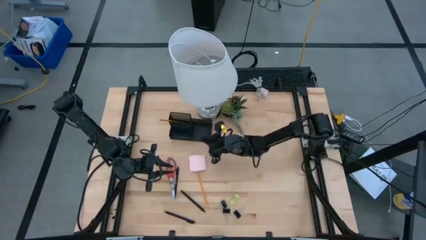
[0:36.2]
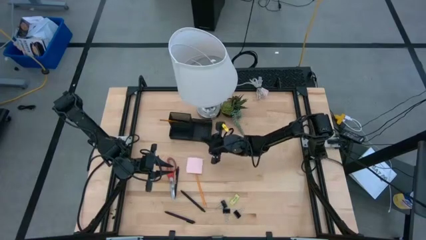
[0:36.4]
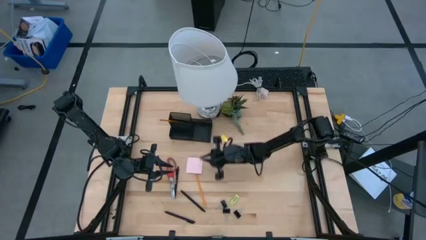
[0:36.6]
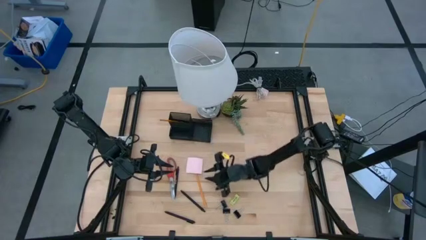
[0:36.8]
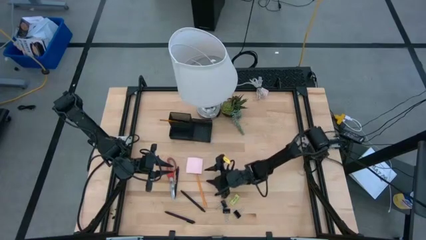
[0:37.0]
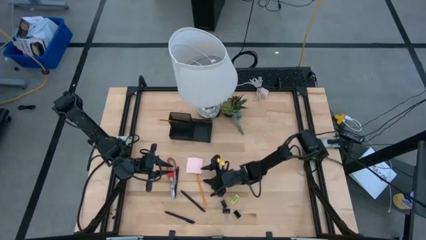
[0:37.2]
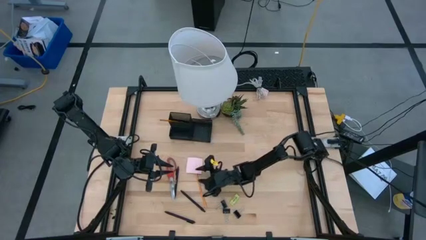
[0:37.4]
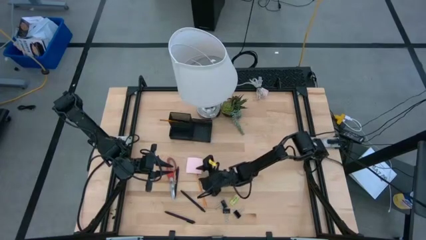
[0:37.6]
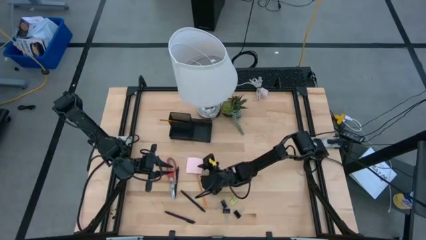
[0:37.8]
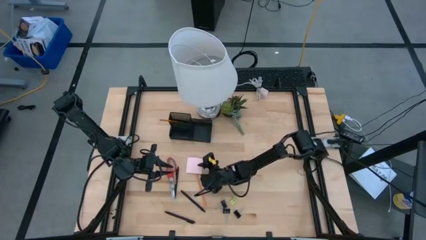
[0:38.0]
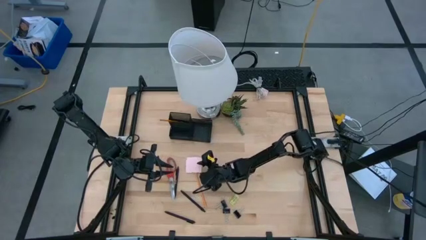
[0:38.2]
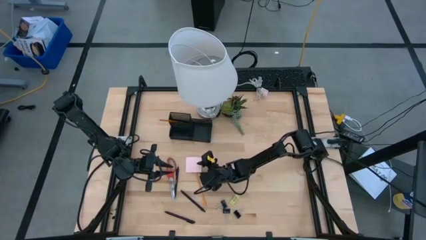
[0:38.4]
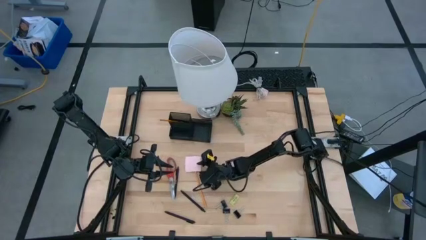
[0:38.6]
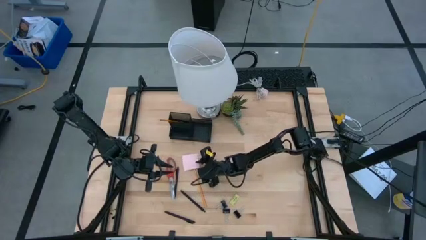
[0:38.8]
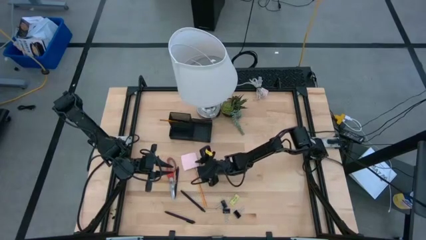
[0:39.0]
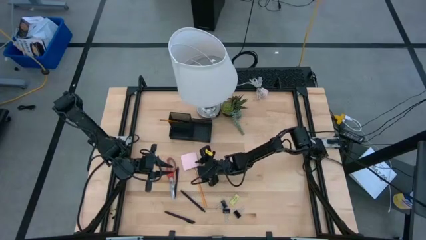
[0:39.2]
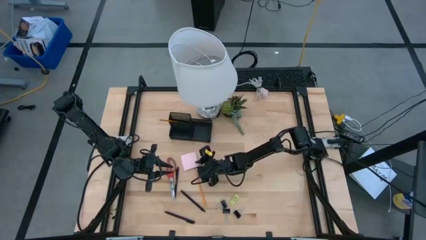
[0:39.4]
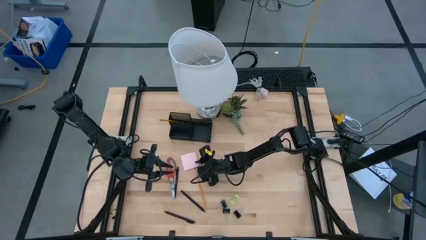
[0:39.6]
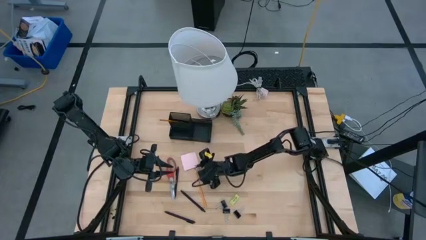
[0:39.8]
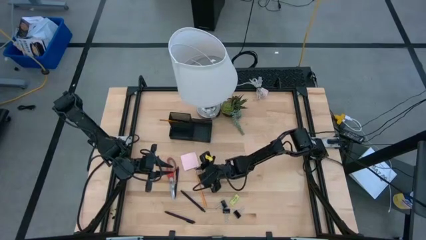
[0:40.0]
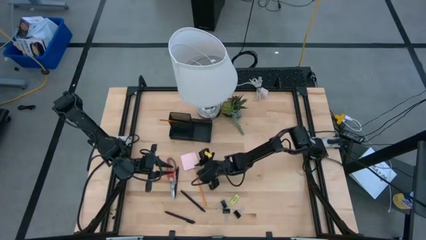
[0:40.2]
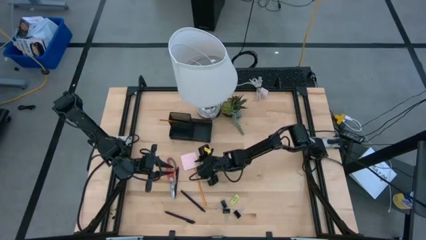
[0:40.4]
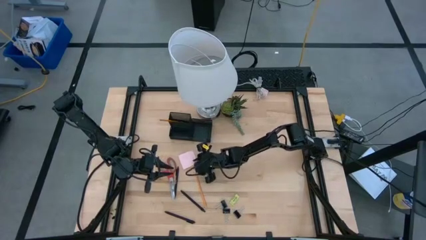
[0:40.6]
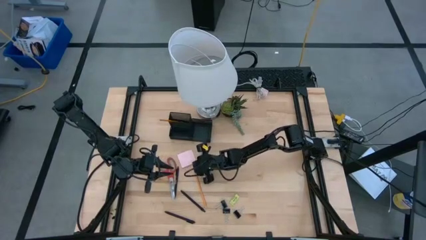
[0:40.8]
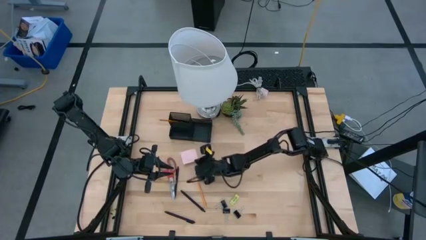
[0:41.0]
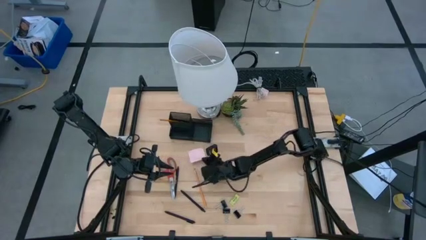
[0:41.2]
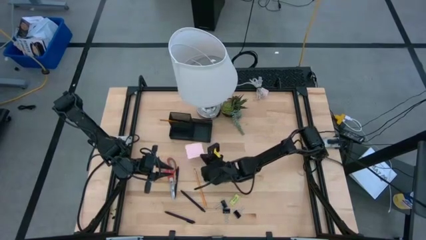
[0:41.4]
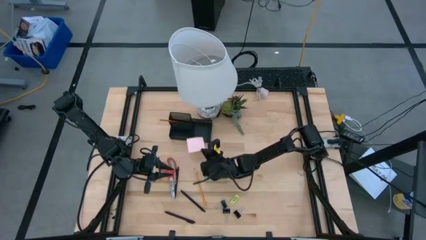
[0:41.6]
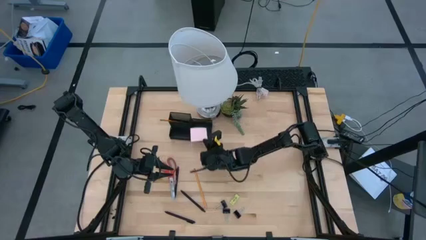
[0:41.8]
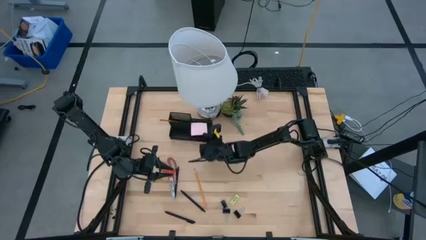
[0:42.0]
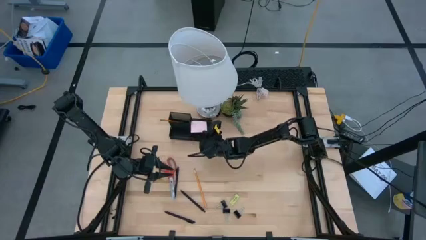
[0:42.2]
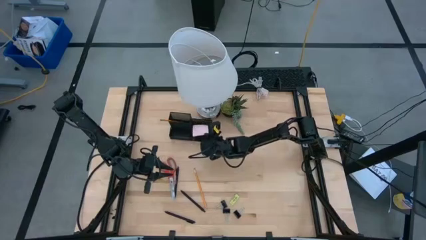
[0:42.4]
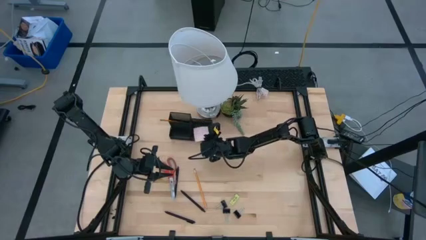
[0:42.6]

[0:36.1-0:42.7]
Task: Pick and place office supplies into organizer
Put the pink sticky note into the black desk organizer

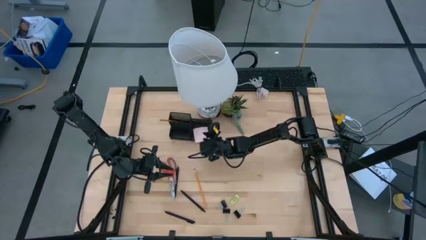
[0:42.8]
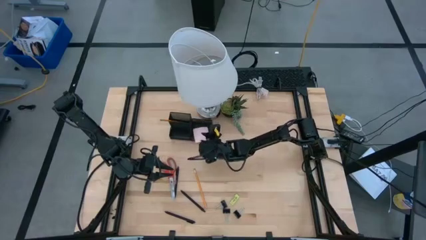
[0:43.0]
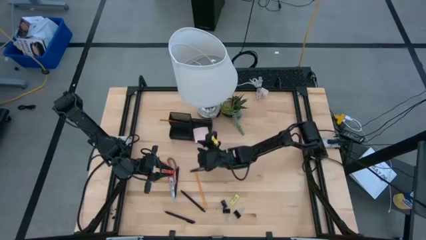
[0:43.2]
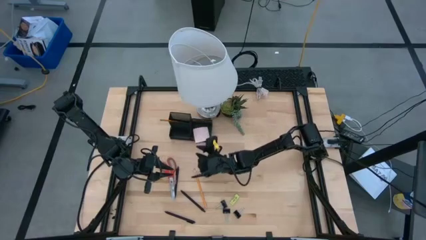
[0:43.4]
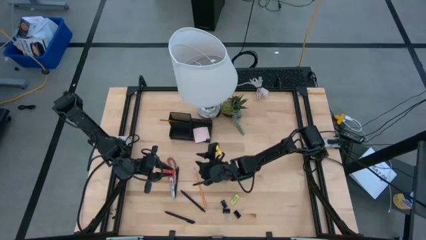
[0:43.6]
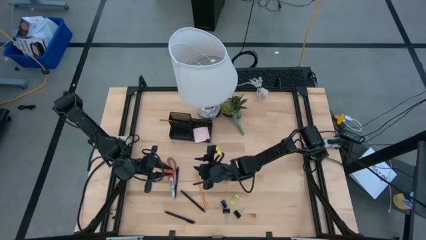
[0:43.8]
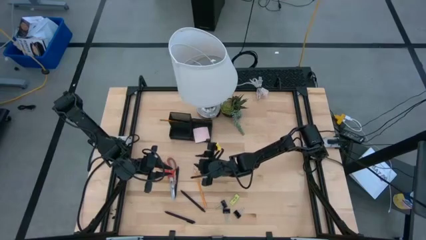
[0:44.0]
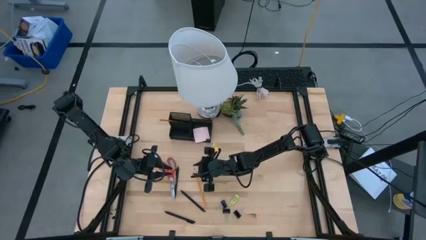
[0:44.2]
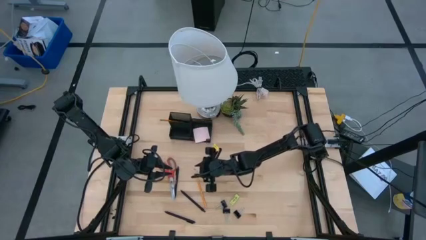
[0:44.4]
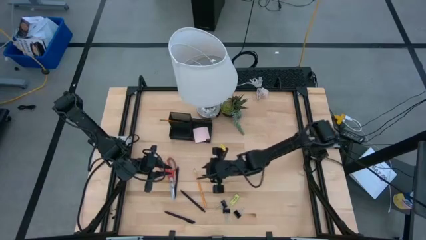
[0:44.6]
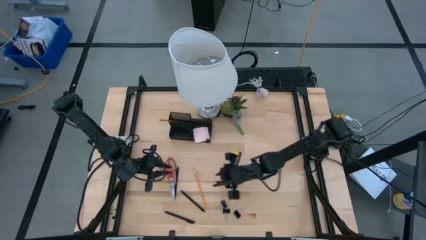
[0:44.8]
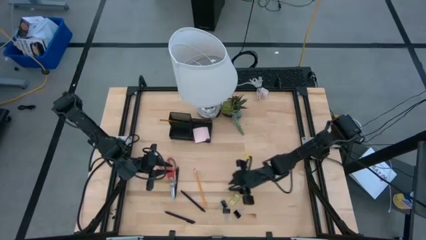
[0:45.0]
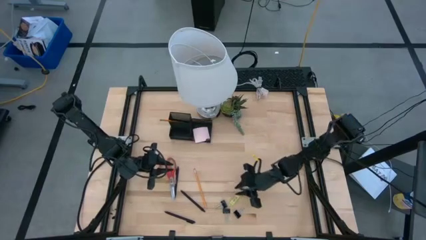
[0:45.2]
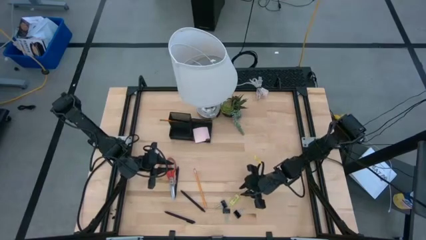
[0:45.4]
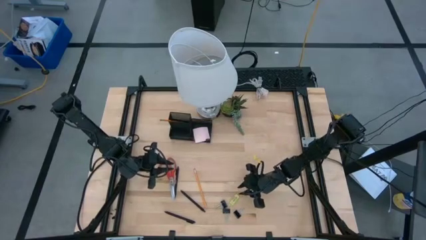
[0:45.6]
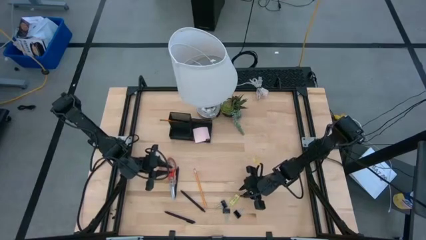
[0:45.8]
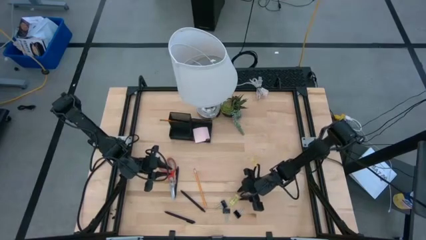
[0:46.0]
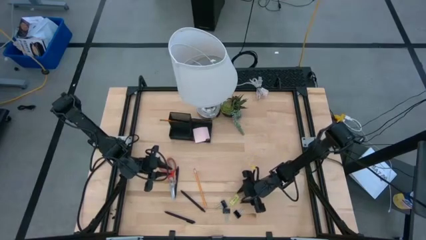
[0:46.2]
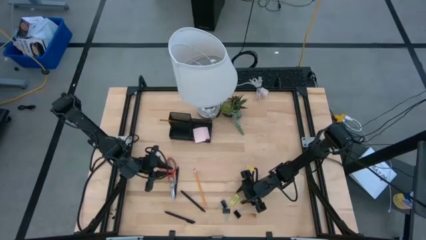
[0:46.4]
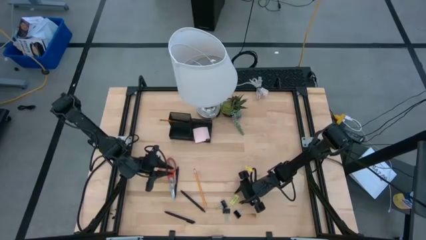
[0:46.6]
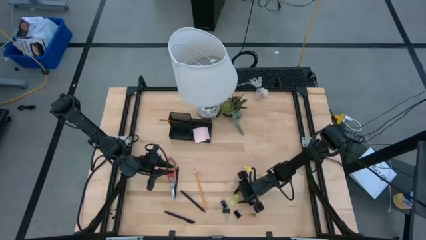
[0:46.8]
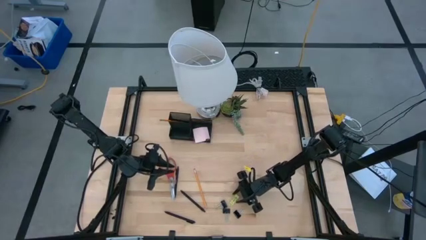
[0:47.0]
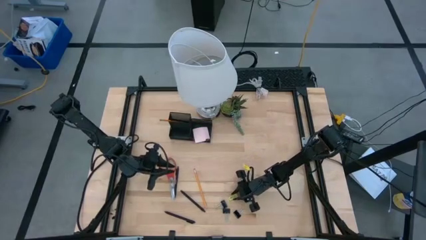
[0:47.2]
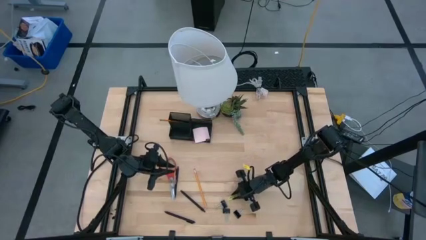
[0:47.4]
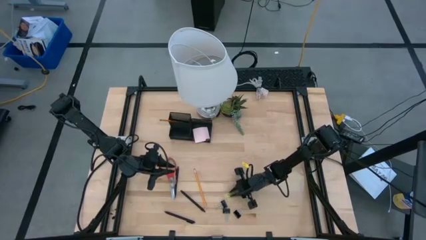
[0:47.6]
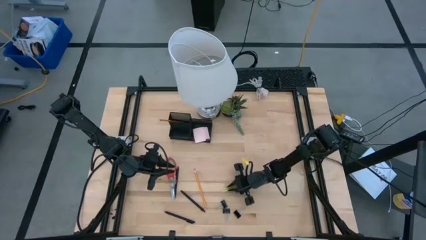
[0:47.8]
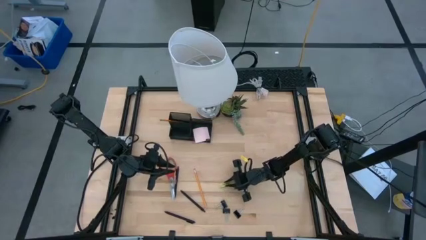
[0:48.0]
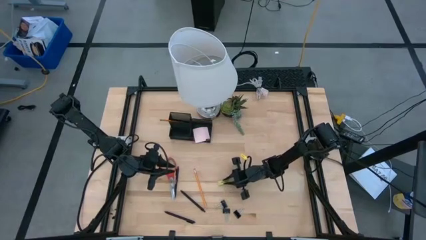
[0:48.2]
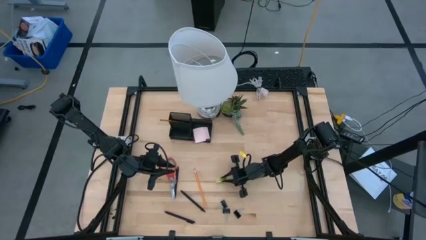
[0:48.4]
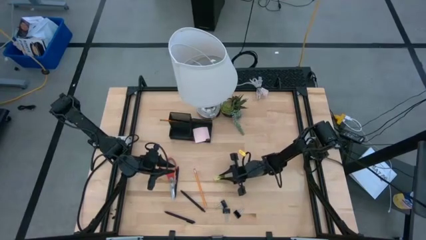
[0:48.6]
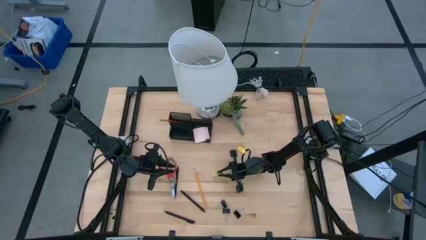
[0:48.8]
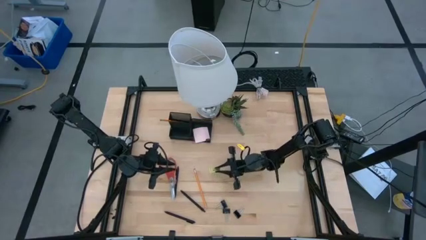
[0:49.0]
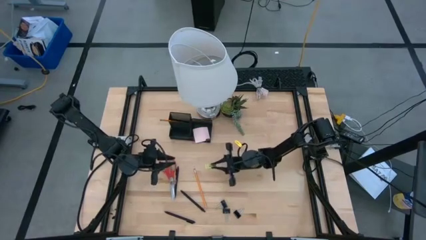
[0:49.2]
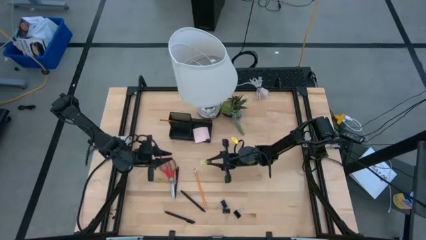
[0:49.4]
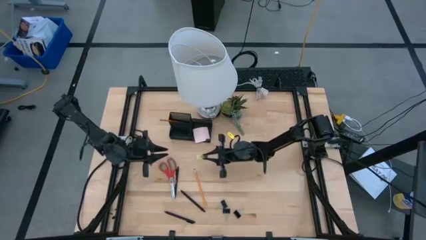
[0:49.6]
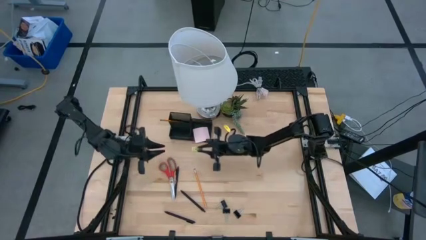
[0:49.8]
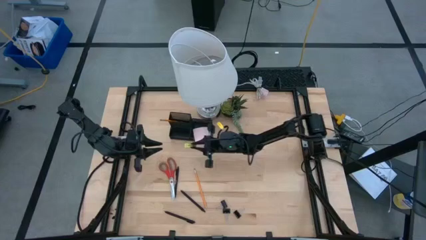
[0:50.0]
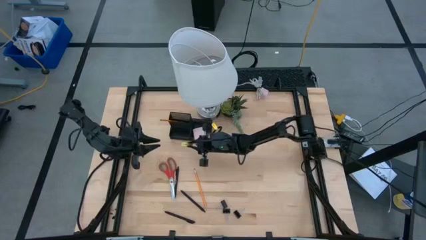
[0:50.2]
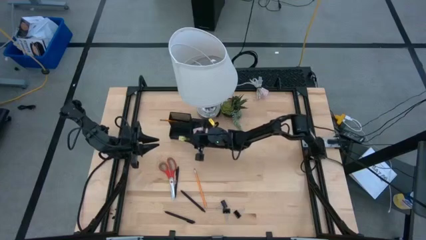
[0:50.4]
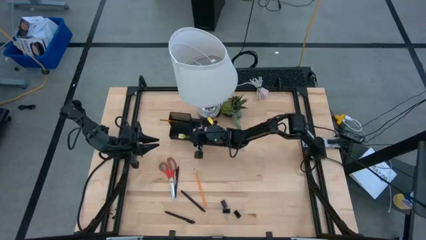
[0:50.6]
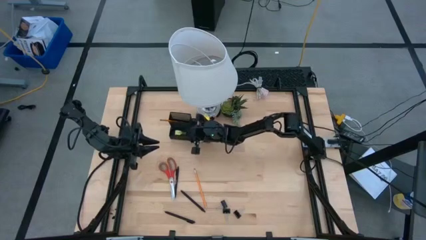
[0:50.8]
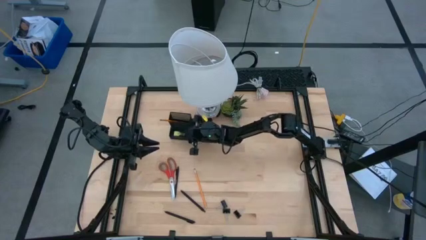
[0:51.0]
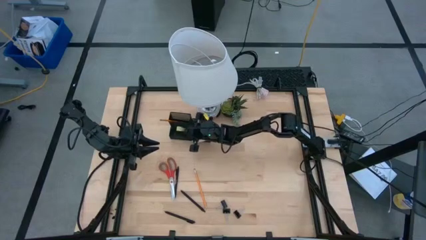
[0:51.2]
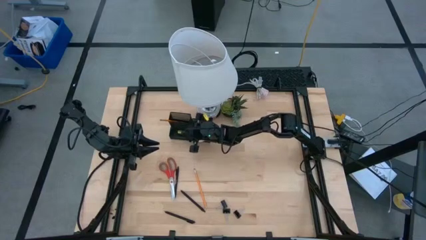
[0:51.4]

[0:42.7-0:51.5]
Put the green eraser into the black desk organizer

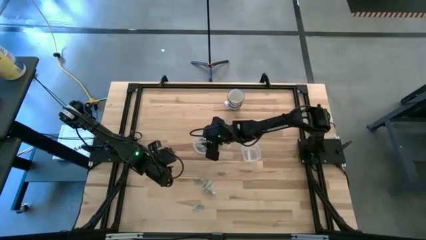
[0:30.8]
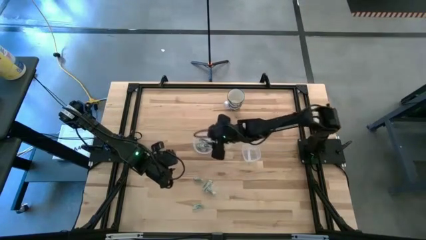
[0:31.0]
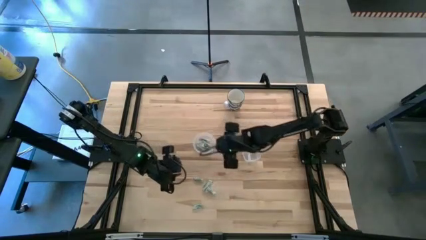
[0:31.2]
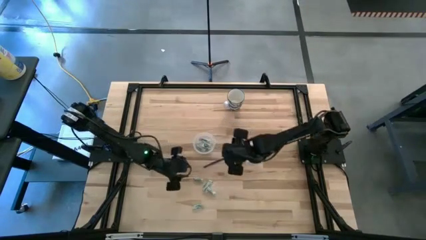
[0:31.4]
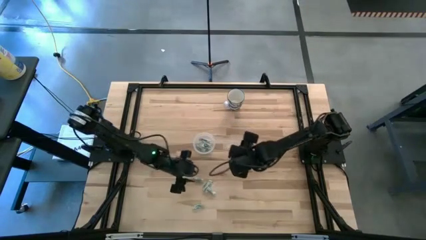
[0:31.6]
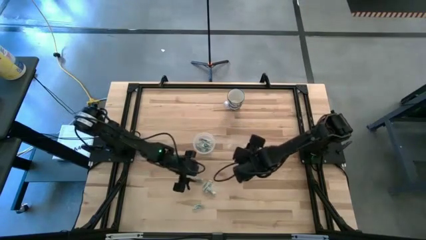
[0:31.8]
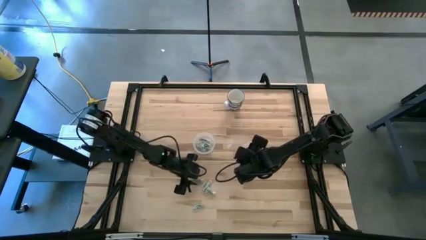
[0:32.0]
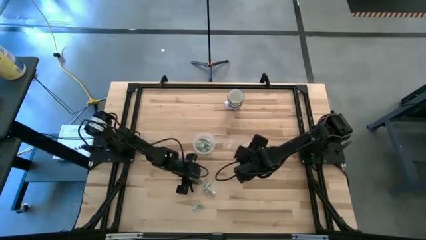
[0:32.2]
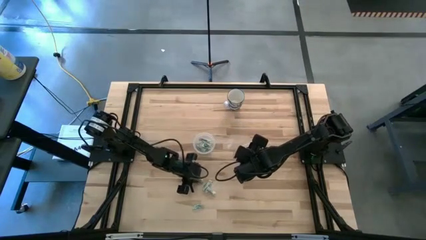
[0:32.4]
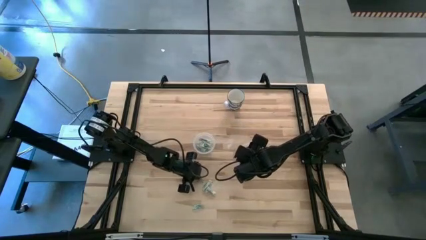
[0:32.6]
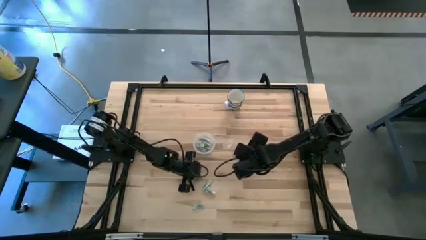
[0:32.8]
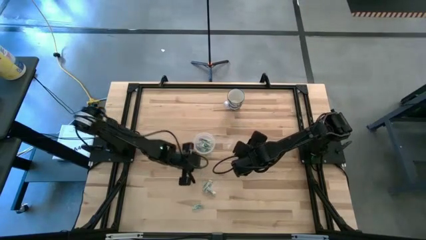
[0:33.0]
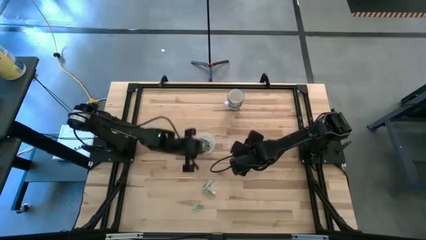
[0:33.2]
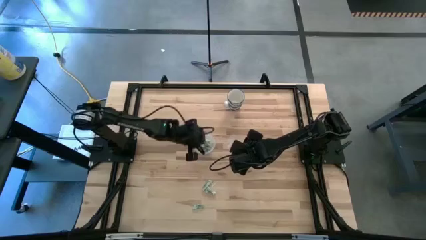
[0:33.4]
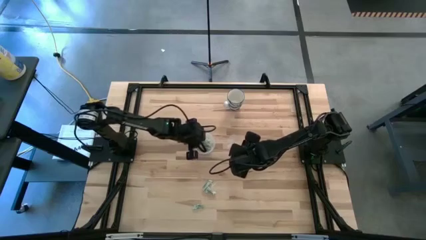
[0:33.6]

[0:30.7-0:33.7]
Task: Pick and place Stevia / Truvia into bins
Put the green stevia packet into the left transparent container
